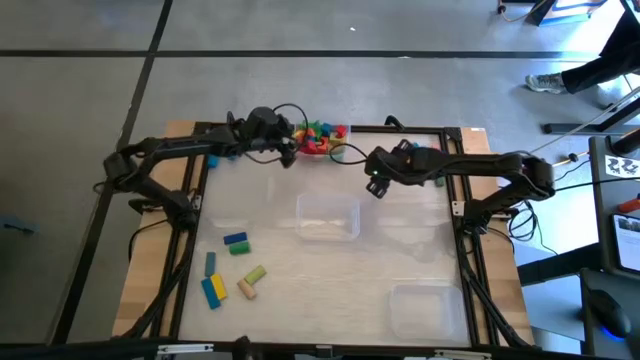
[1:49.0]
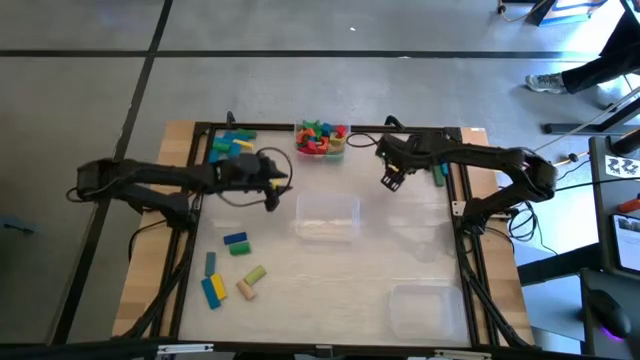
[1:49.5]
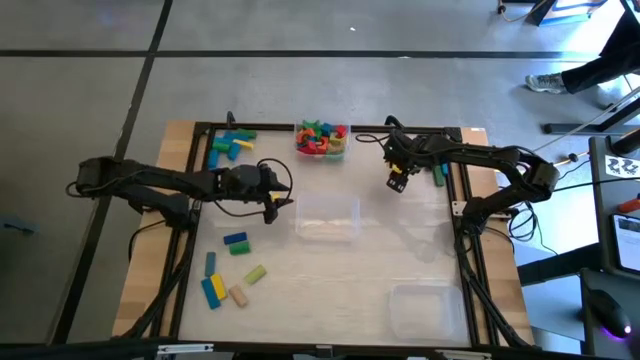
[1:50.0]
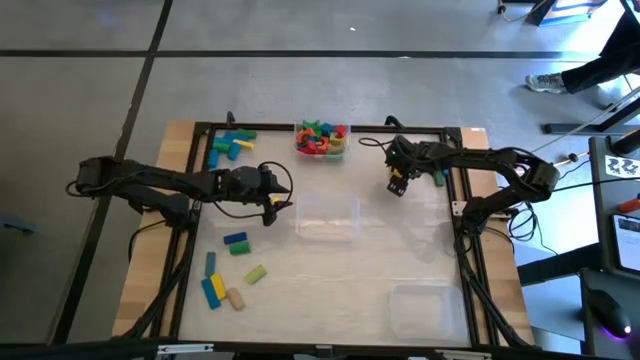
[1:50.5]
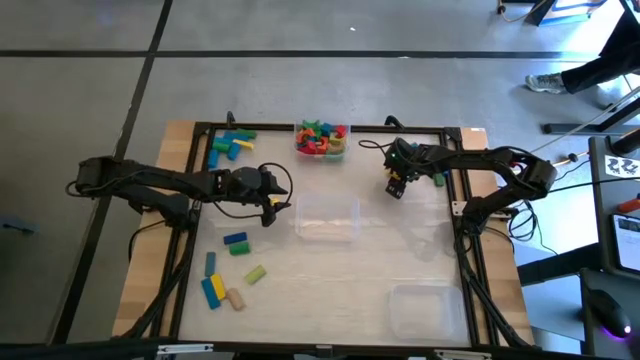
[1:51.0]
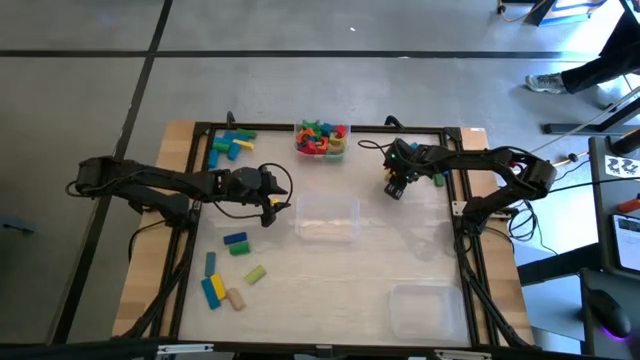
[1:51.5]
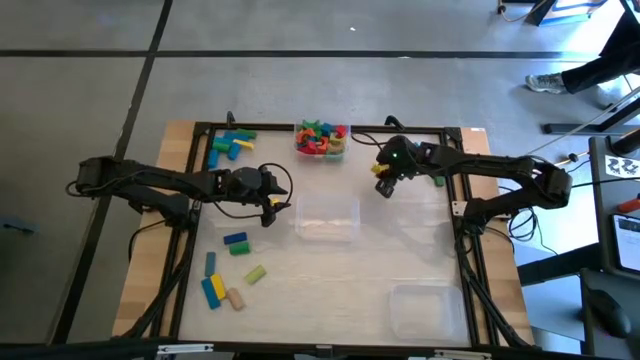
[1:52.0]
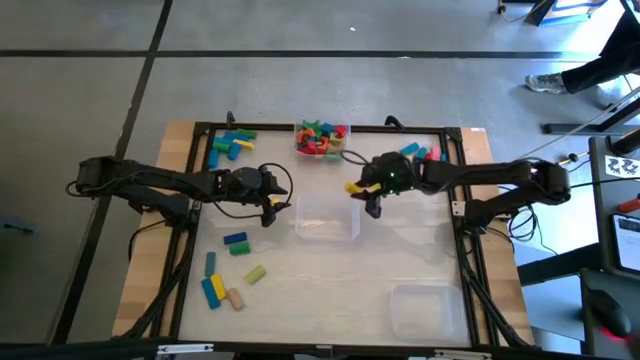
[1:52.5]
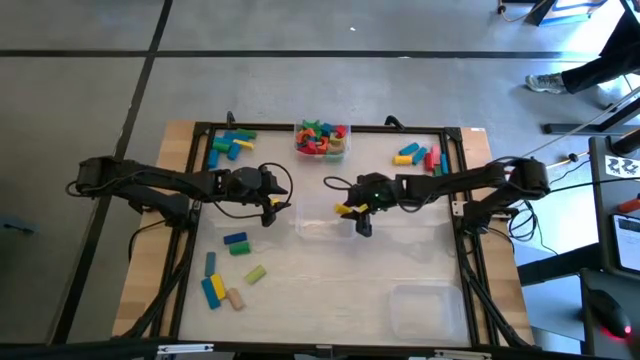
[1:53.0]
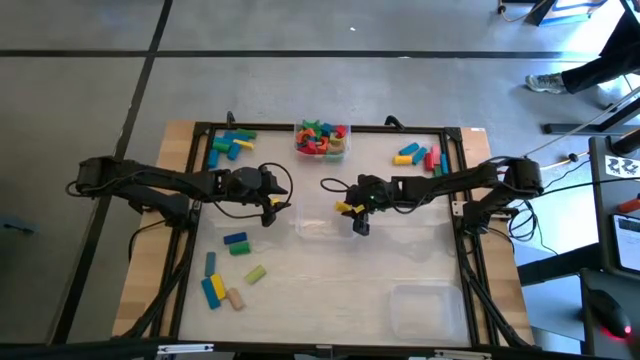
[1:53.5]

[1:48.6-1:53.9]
Task: Sort blocks by size
Put the yellow cylindrical block into the center transparent bin

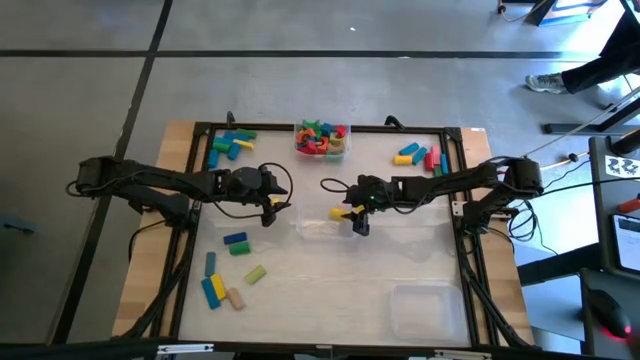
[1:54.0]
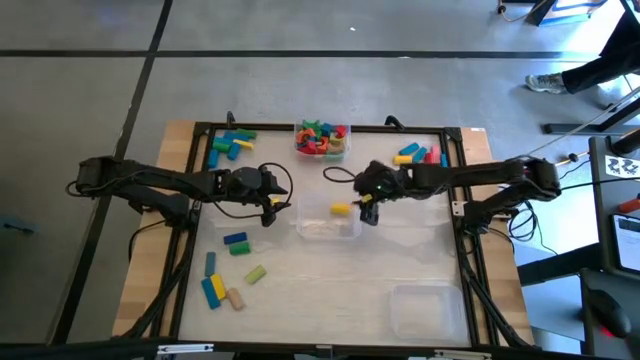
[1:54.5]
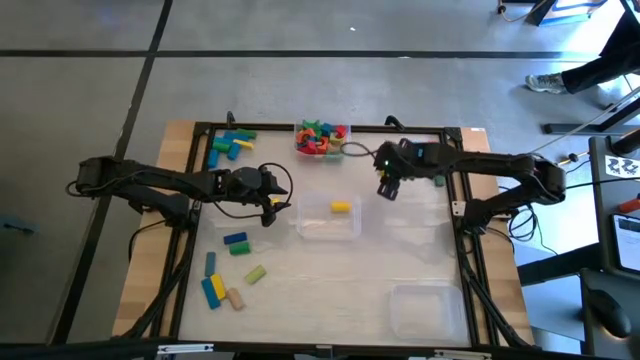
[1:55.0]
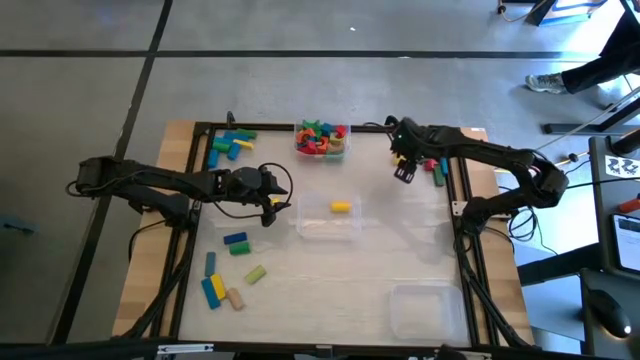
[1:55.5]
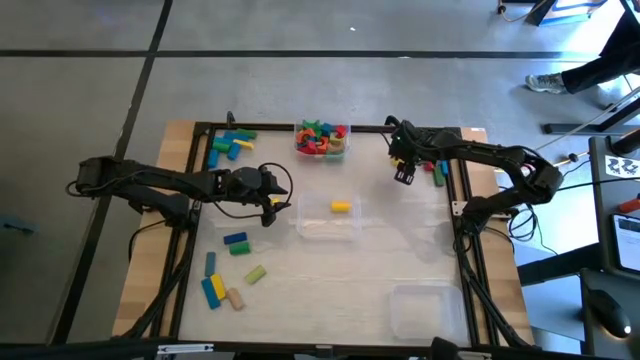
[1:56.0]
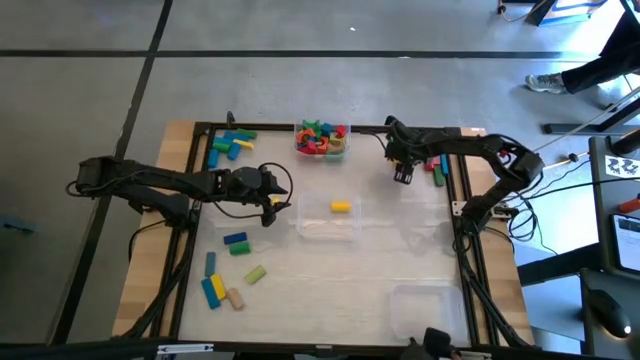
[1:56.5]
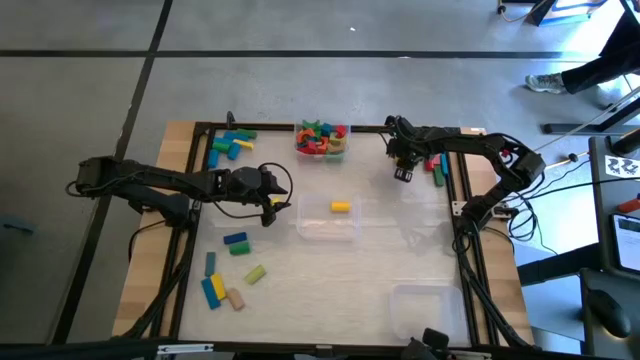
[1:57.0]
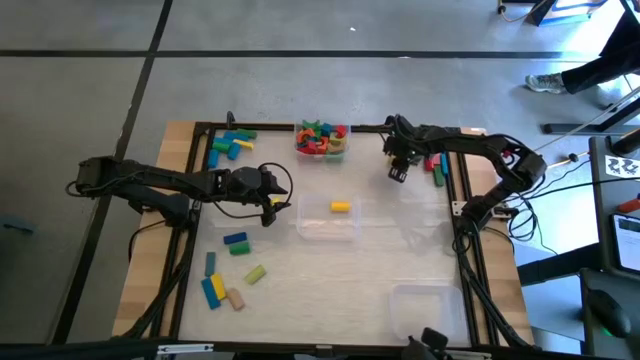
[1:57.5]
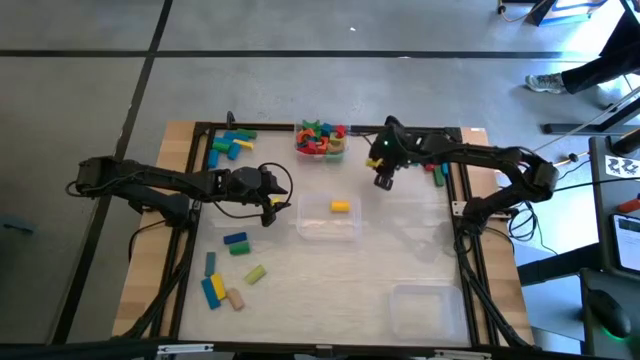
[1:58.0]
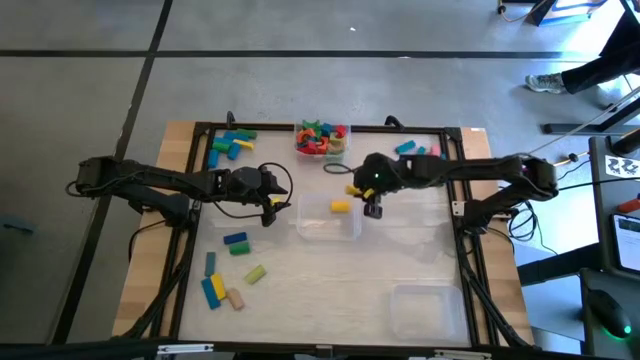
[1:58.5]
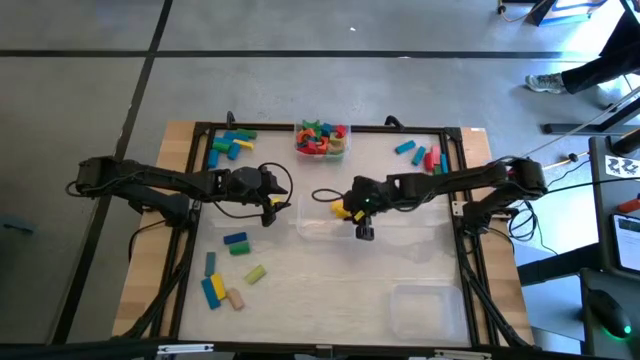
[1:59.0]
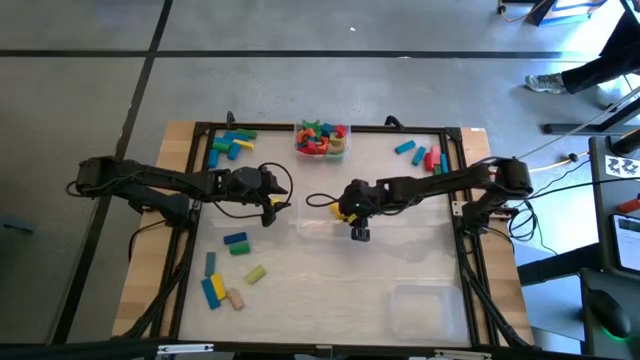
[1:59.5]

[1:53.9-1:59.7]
Put the yellow cylindrical block into the center transparent bin

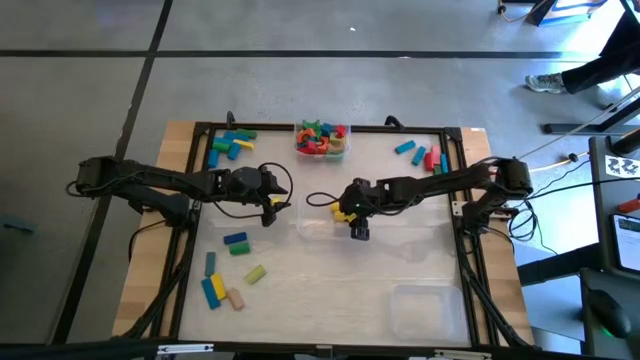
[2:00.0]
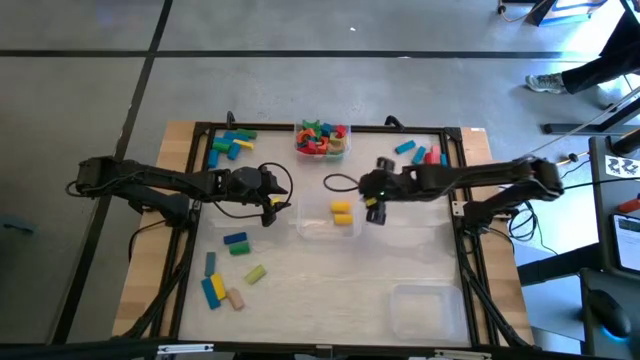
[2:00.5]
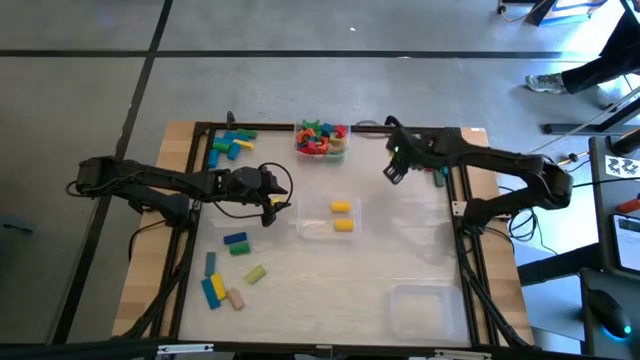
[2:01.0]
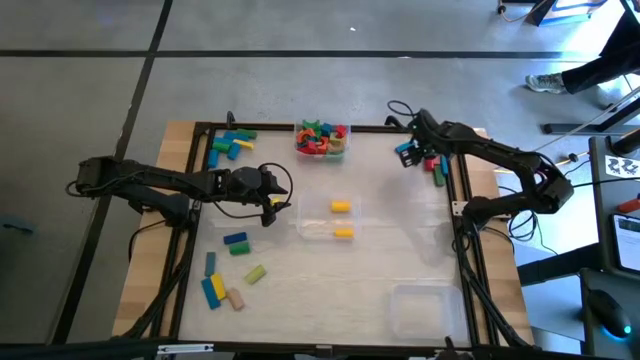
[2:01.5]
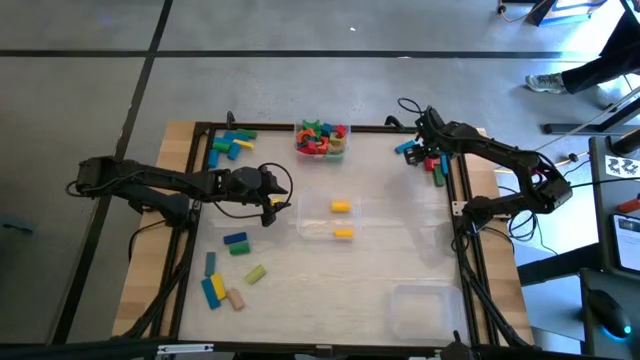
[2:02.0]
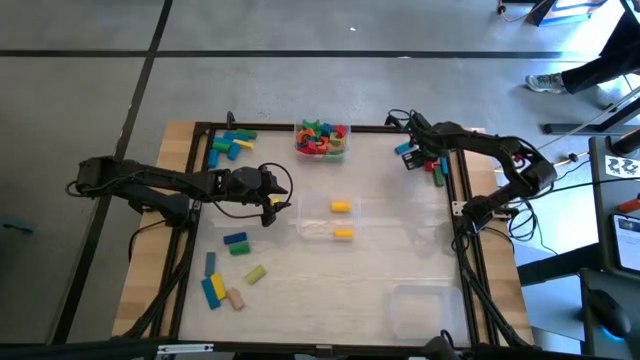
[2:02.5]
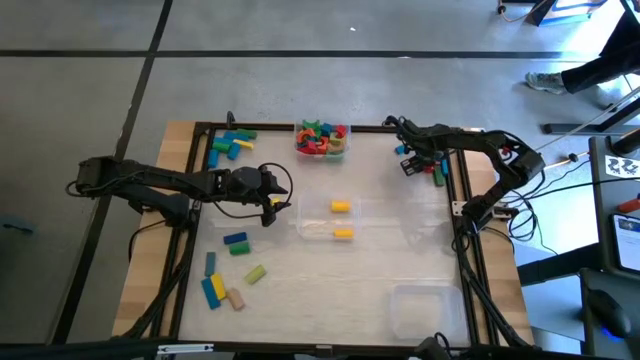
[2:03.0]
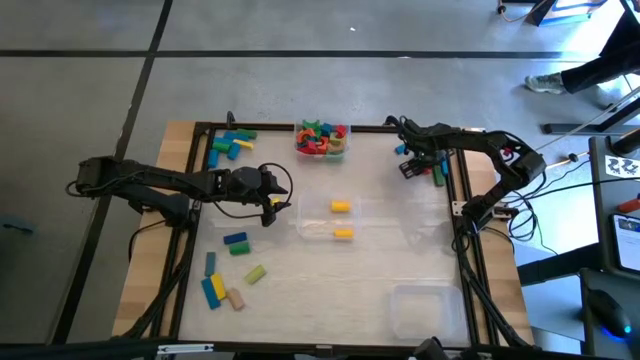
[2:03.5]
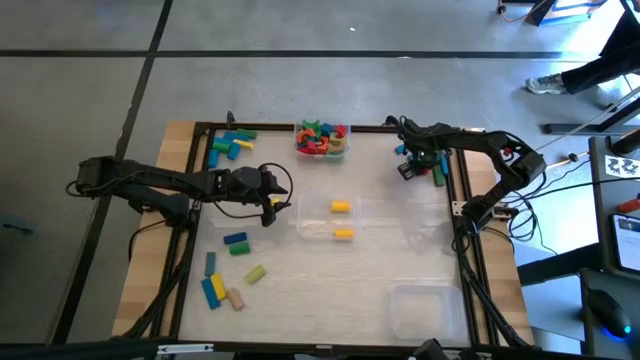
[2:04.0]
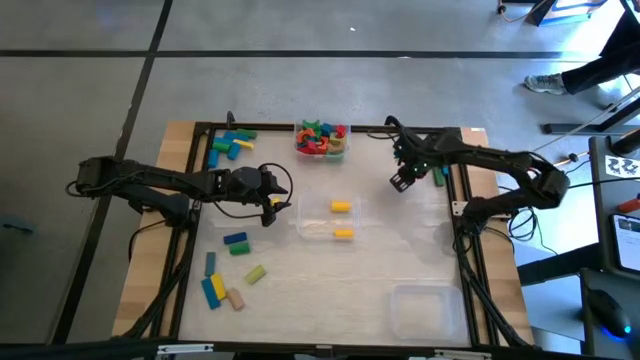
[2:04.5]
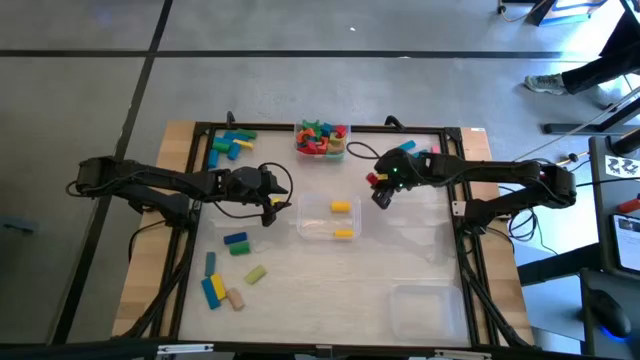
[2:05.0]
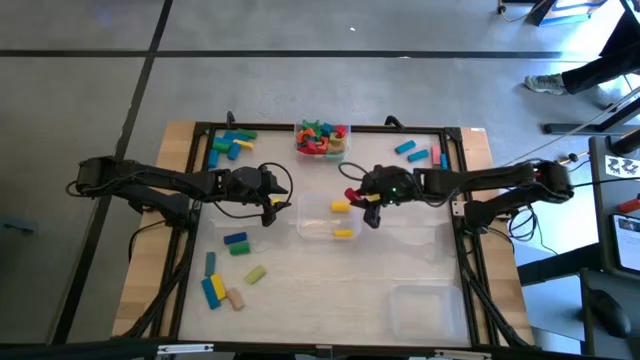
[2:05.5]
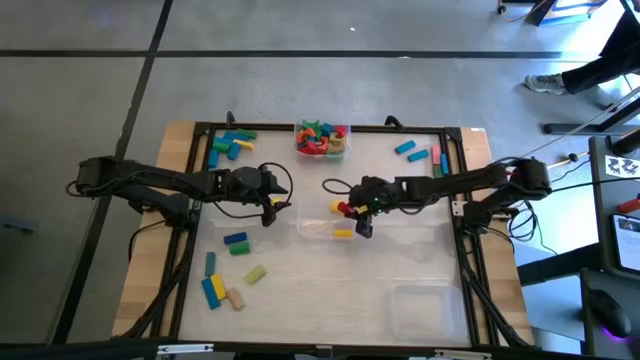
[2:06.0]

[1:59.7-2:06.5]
Put the red cylindrical block into the center transparent bin

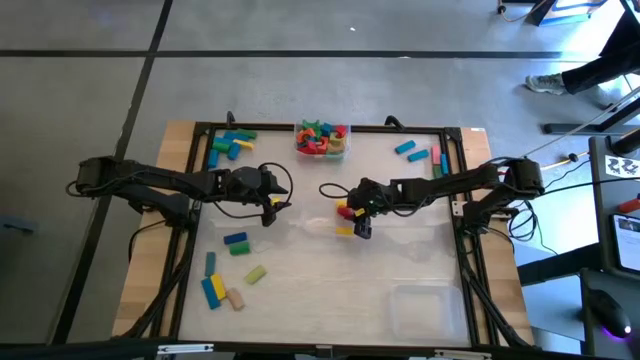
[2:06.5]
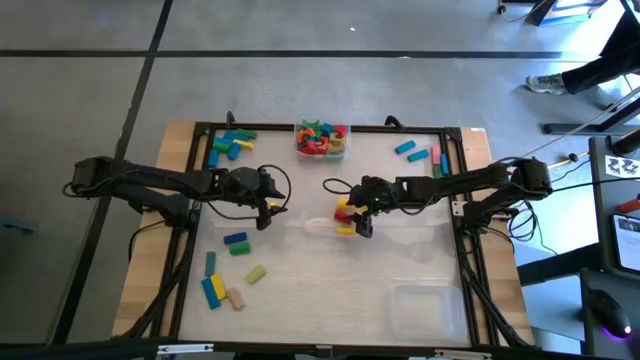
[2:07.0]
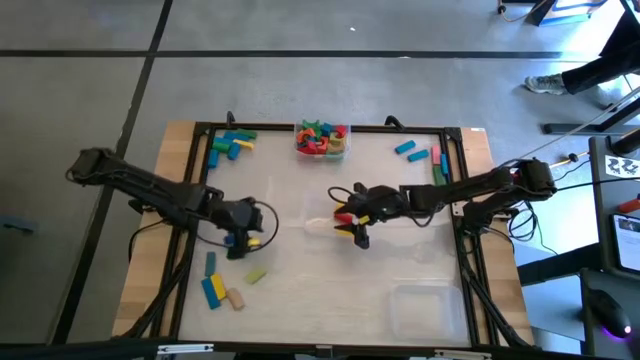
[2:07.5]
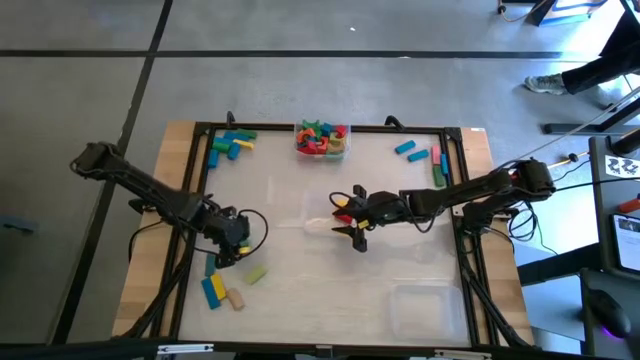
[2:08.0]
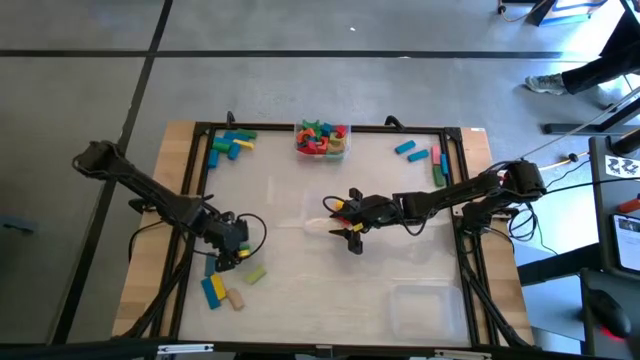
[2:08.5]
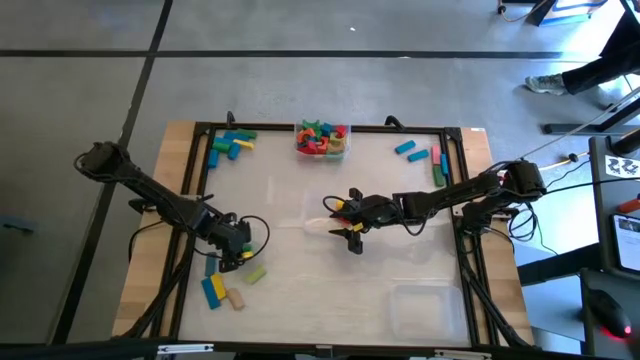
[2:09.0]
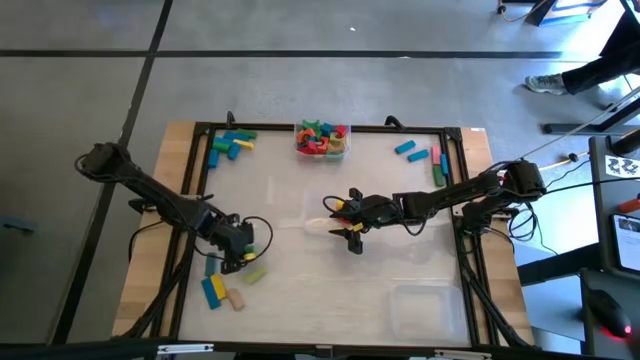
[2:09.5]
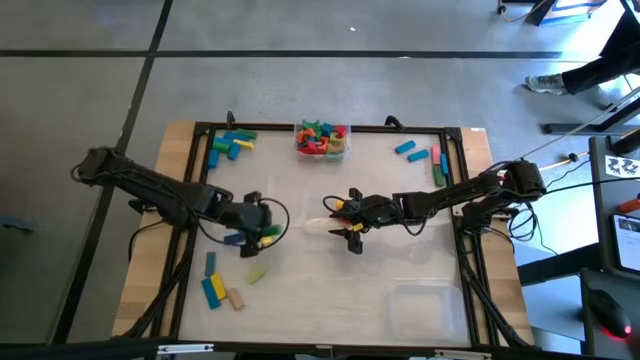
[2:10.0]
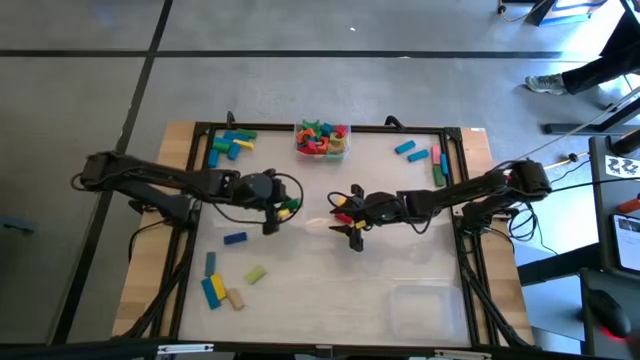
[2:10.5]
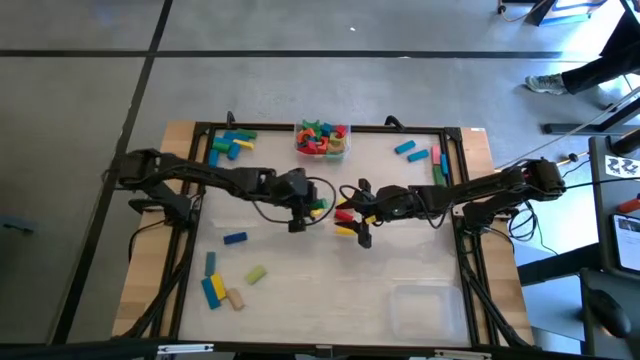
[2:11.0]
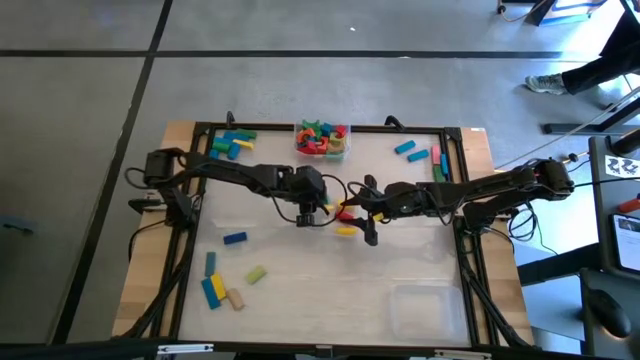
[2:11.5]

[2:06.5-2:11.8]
Put the green cylindrical block into the center transparent bin
